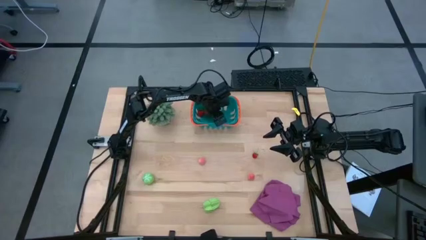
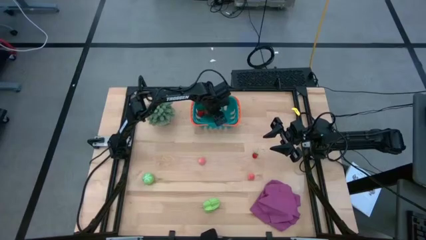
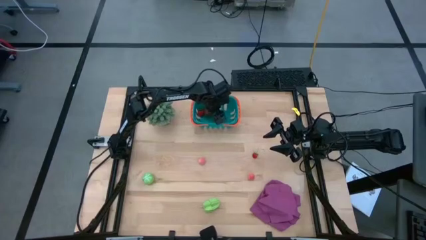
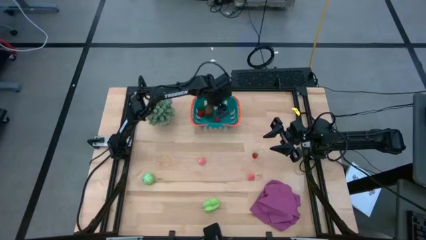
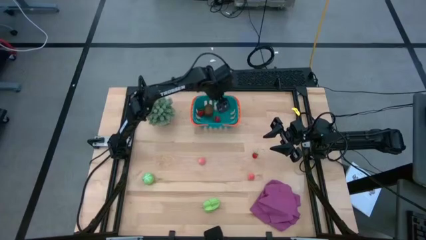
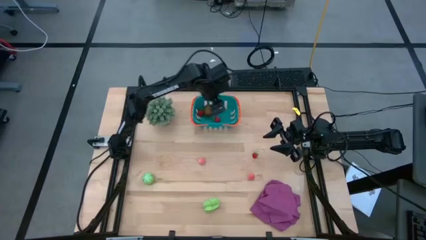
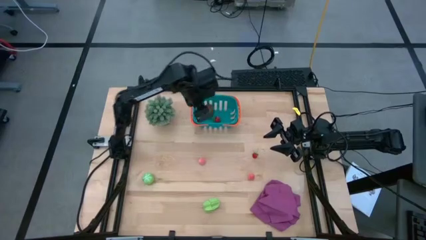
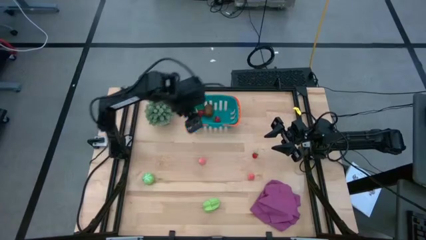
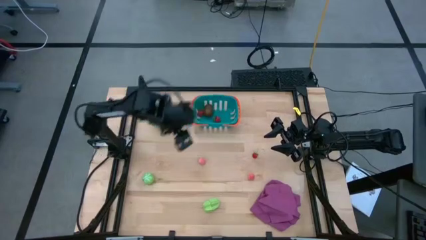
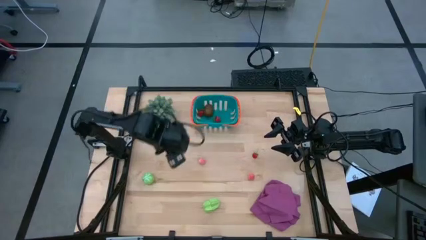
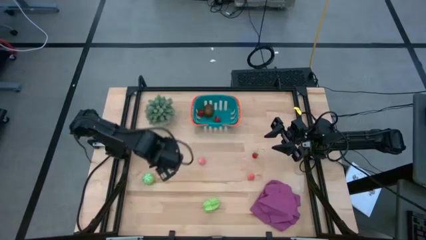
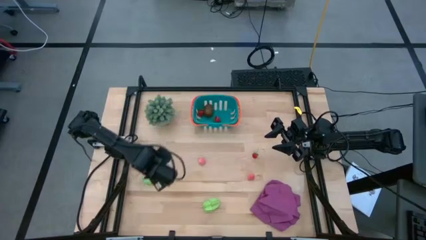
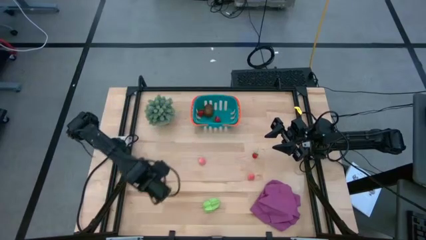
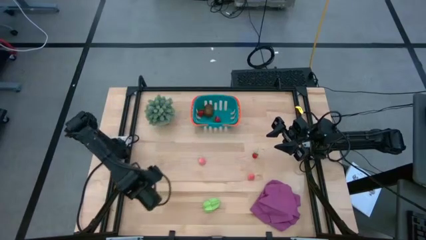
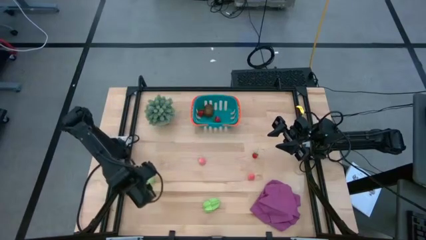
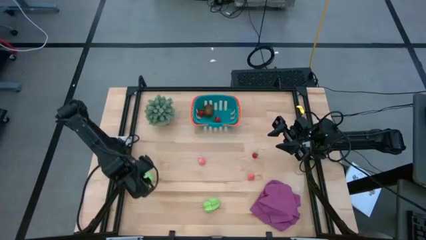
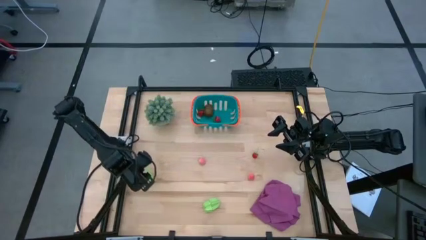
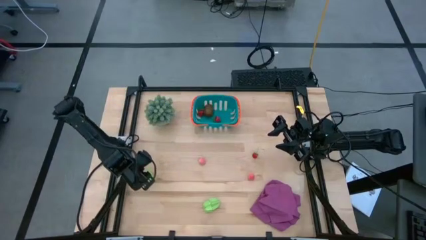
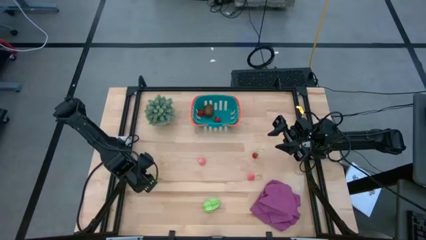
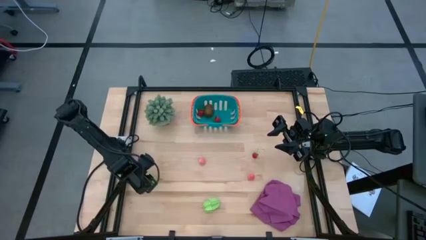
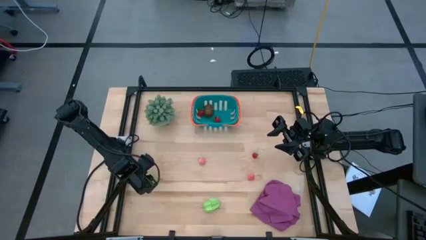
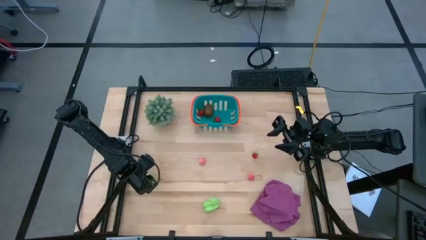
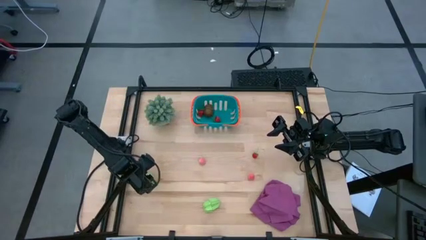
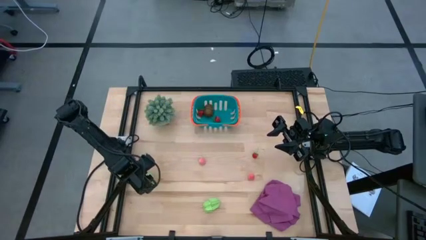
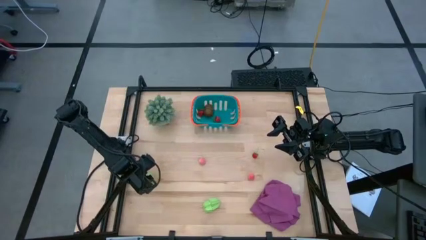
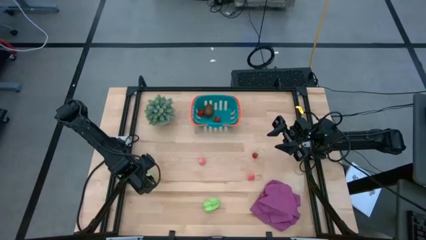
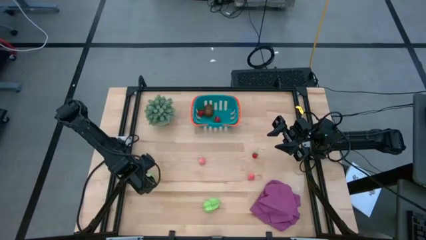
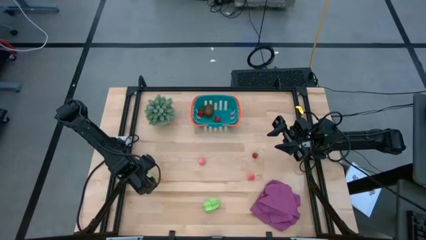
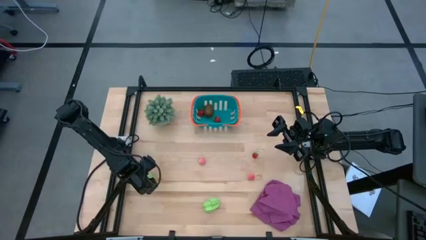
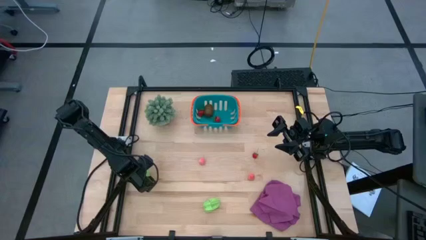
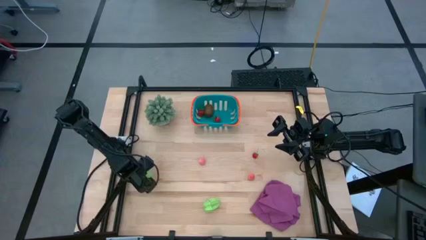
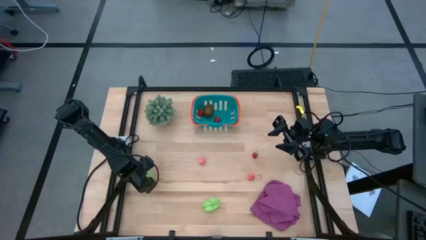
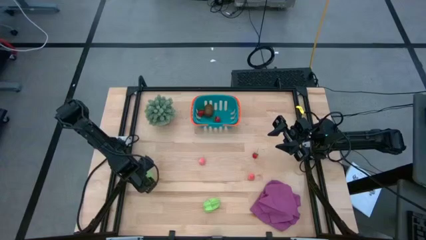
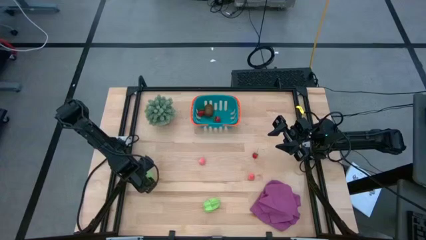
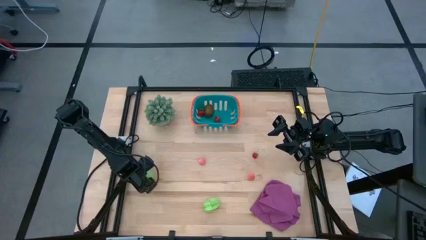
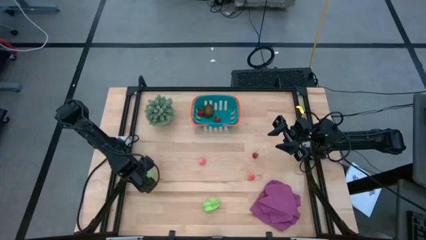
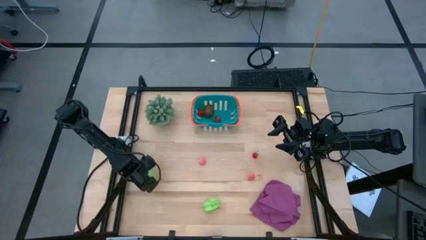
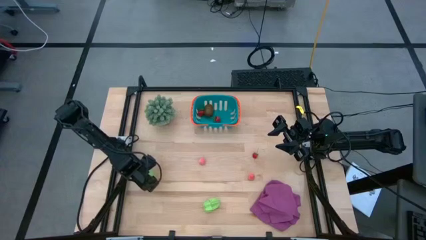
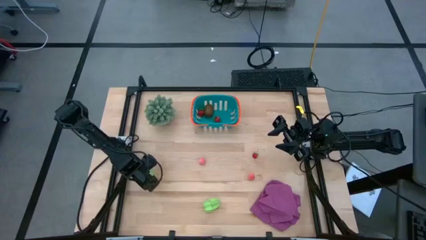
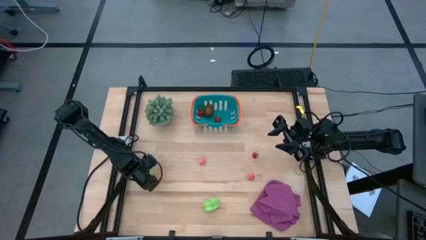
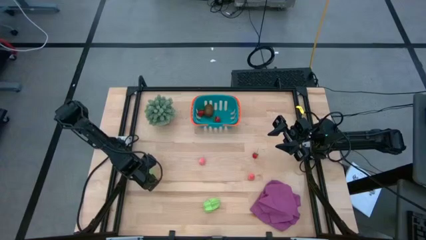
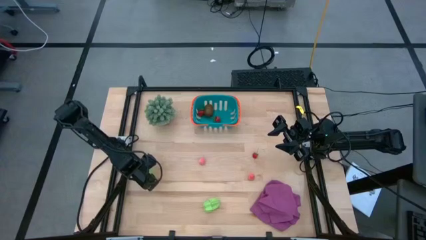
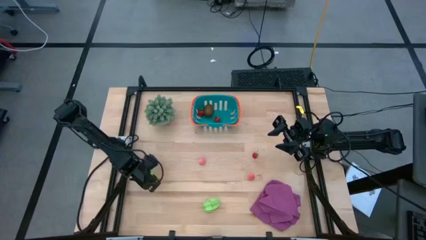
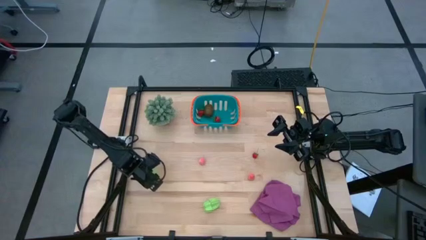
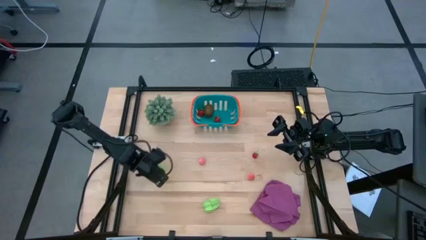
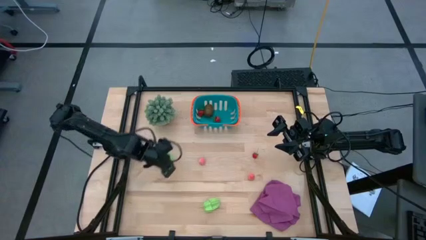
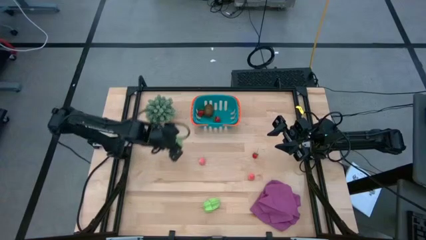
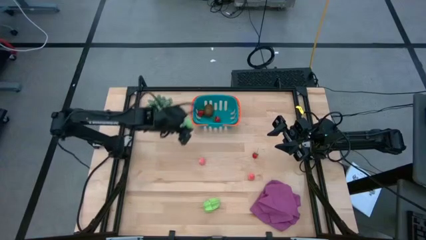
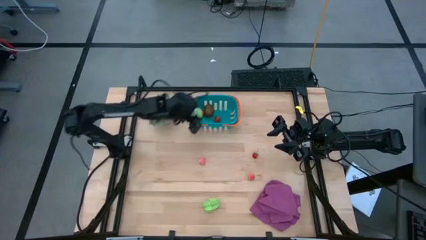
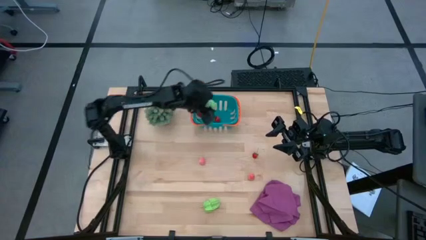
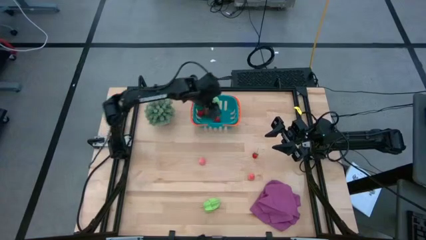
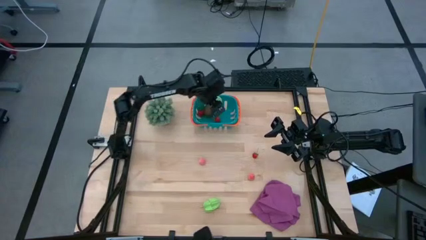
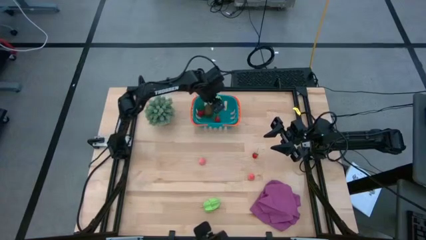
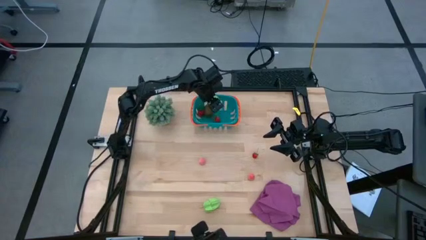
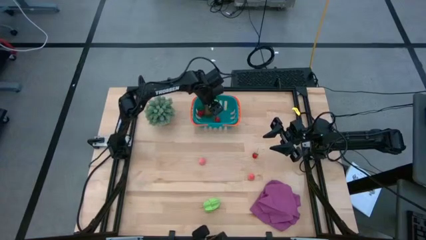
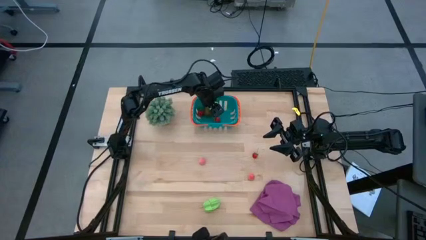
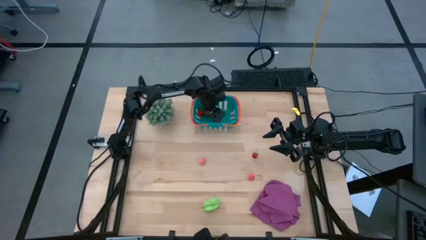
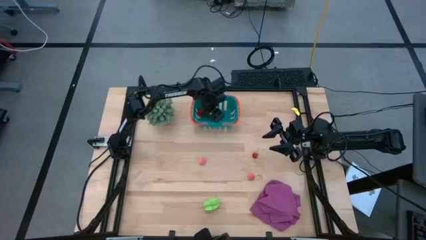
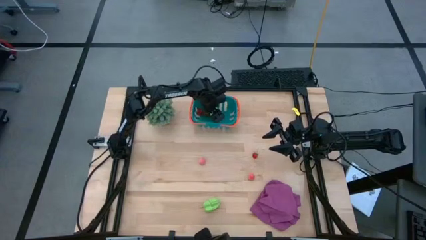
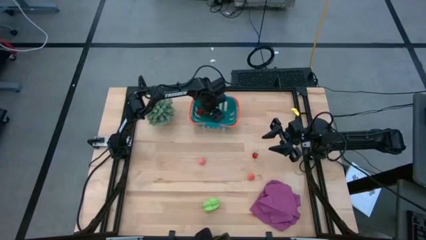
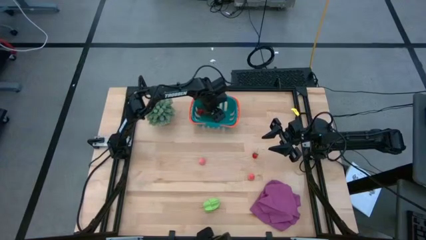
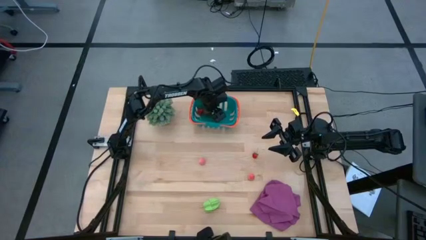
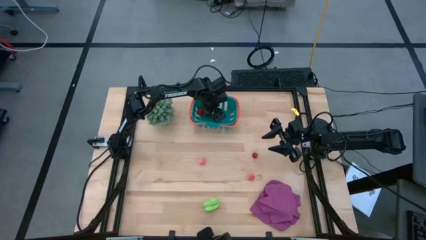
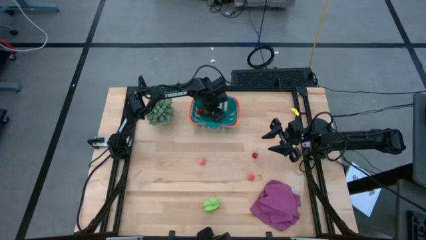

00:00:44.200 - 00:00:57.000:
Task: Pick and placing Produce into tupperware
Put the green cabbage into the blue basket
